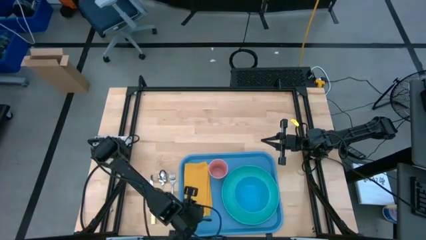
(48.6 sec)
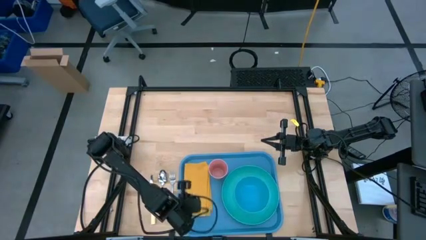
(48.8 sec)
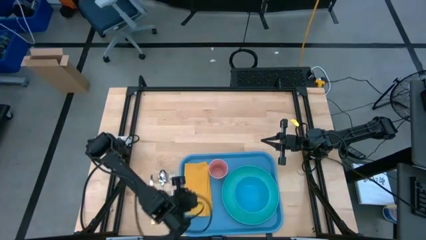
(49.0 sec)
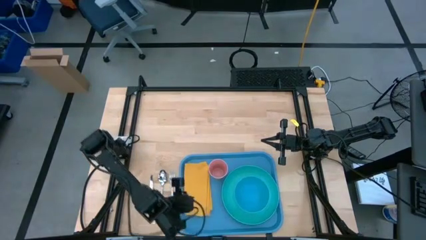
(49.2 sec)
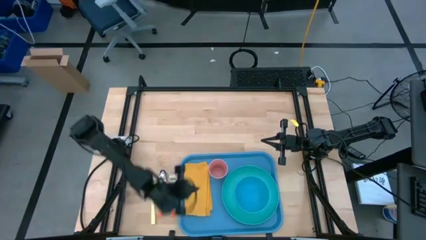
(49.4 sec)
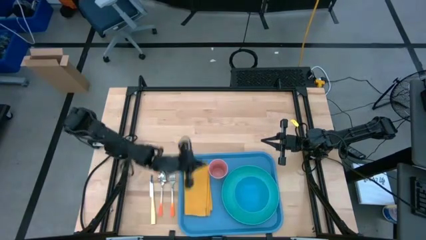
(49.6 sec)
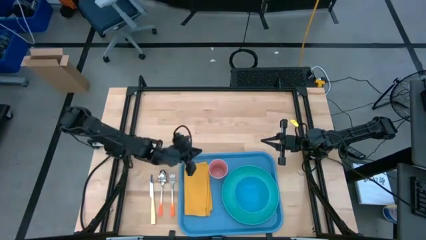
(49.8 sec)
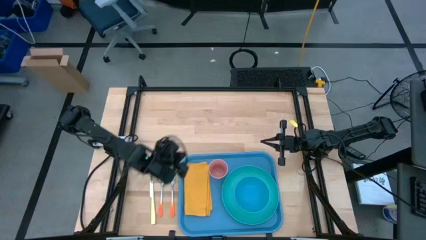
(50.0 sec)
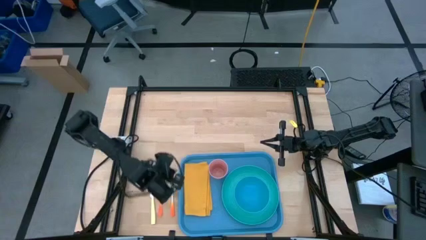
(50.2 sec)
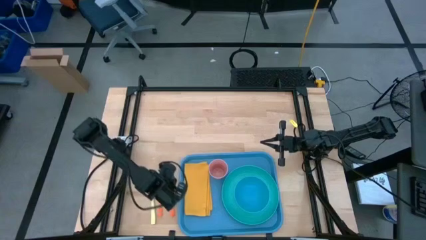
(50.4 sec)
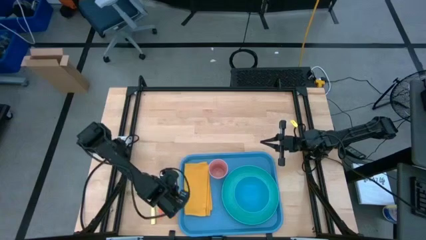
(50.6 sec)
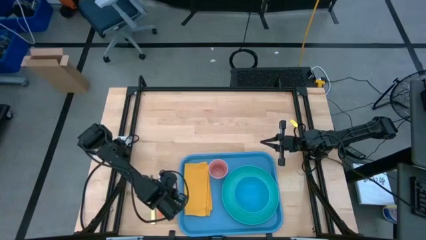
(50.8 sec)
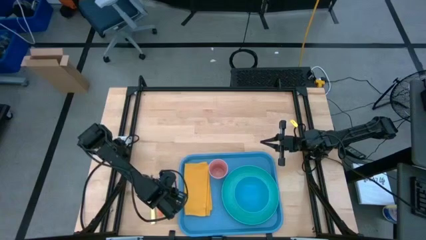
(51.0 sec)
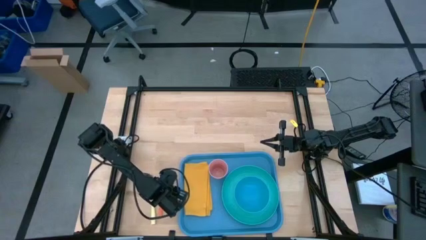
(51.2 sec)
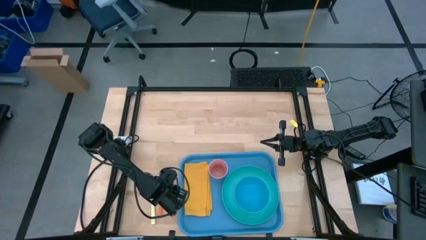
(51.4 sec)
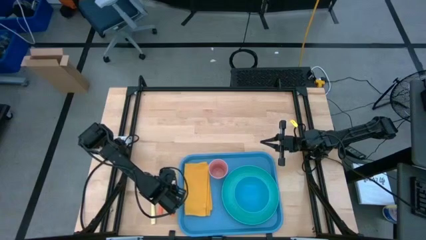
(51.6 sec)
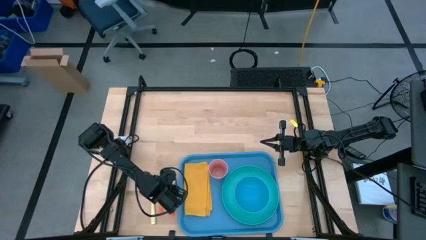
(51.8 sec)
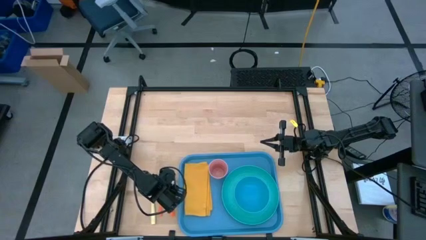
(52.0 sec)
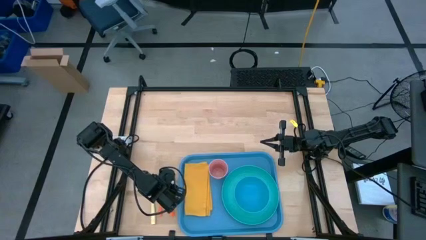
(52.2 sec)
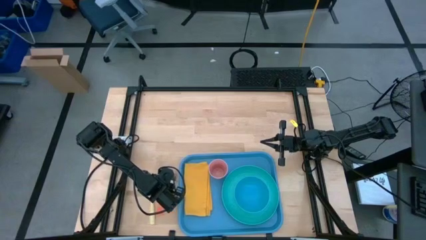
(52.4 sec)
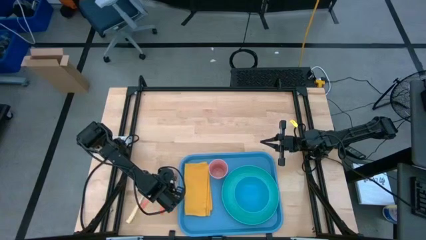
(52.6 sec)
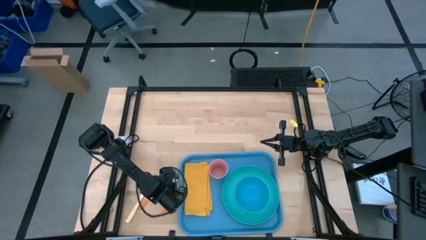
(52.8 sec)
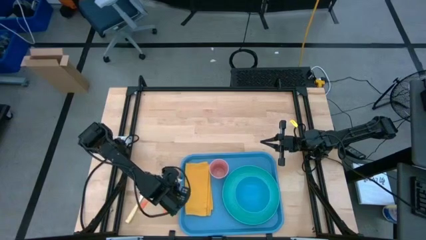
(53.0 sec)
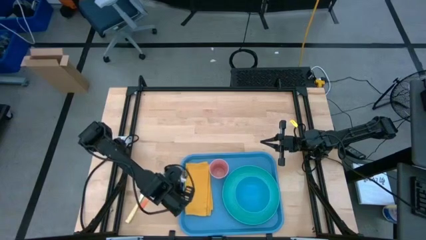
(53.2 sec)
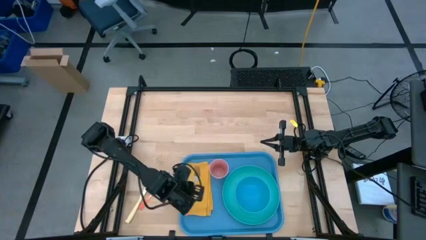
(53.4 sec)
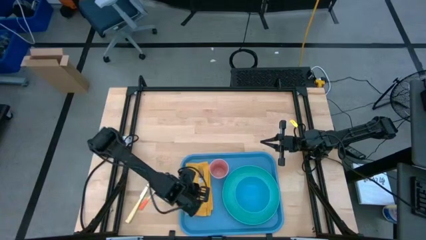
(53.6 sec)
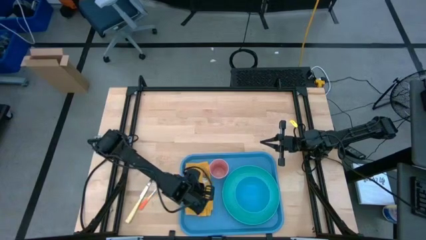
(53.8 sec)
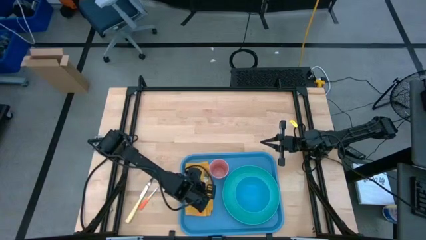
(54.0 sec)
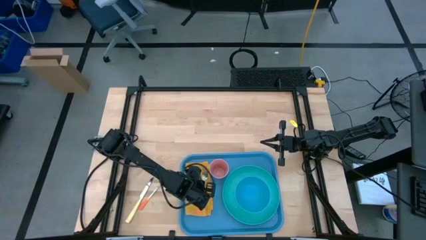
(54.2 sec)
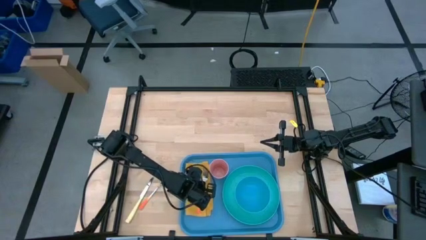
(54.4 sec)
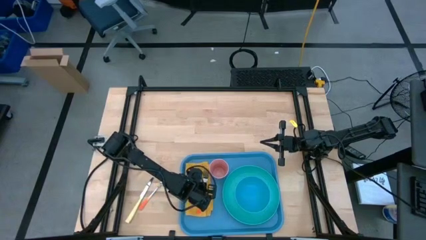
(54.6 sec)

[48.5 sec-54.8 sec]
Task: Set up tray
Put the orange fork on the yellow napkin

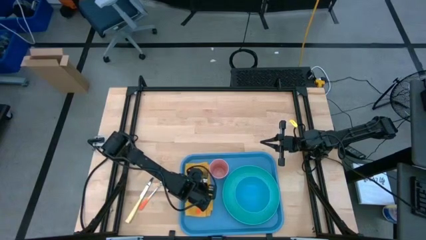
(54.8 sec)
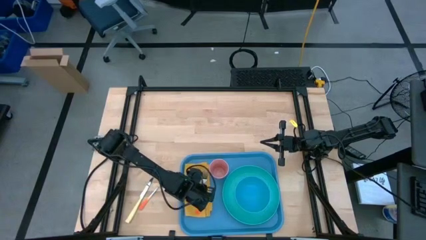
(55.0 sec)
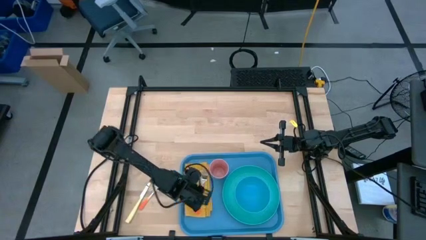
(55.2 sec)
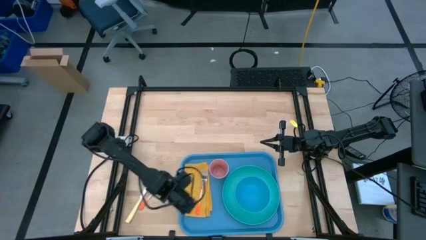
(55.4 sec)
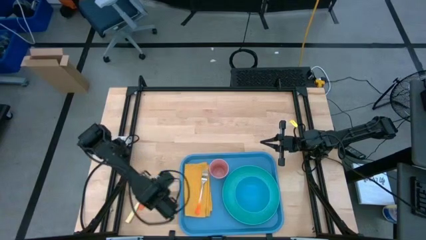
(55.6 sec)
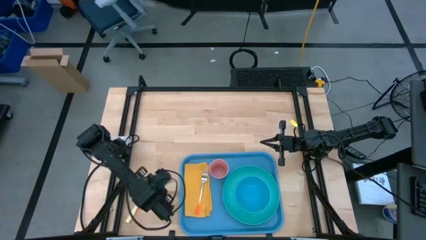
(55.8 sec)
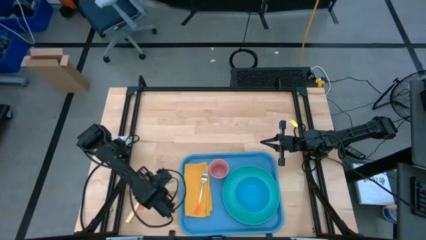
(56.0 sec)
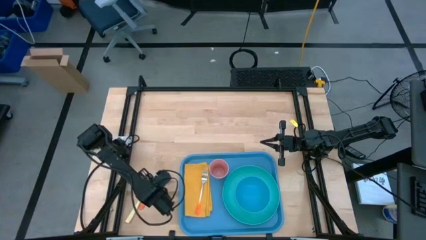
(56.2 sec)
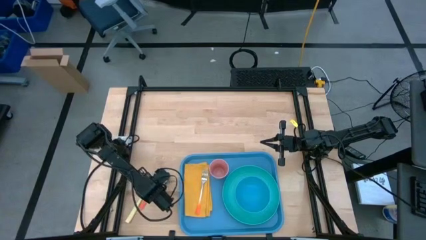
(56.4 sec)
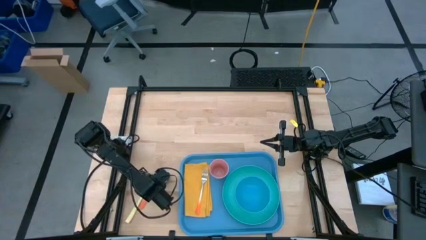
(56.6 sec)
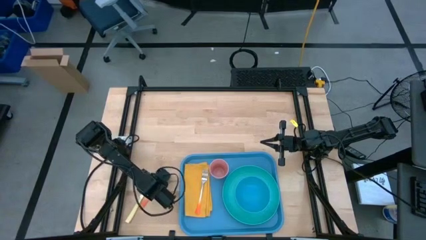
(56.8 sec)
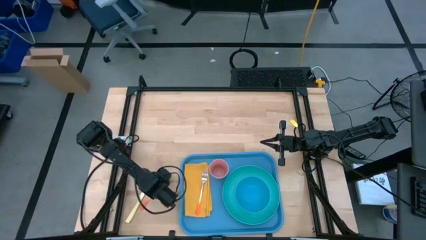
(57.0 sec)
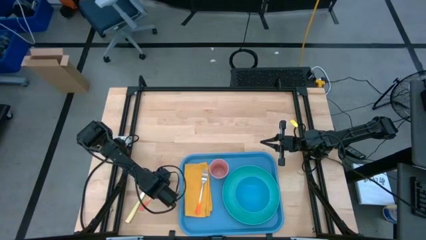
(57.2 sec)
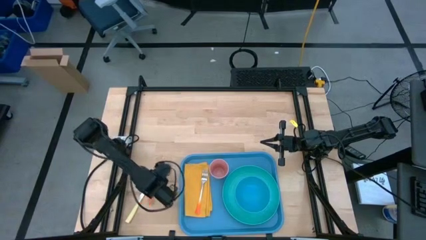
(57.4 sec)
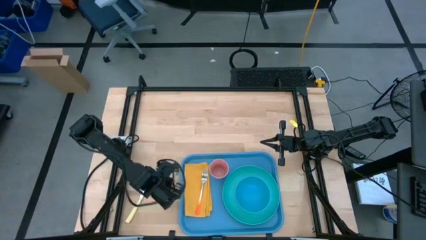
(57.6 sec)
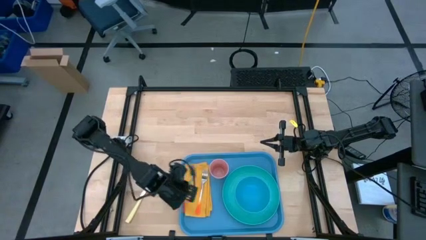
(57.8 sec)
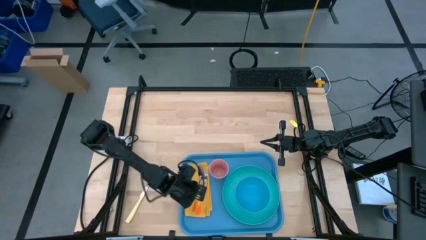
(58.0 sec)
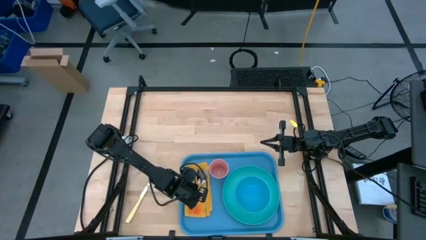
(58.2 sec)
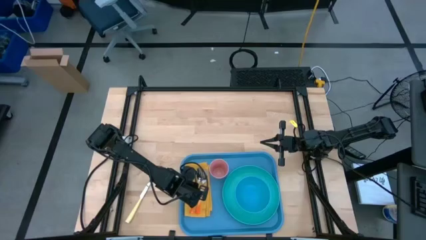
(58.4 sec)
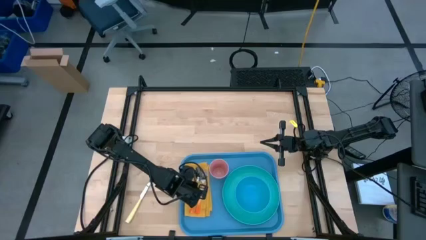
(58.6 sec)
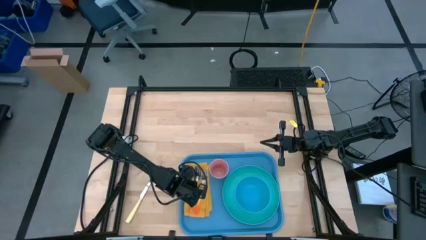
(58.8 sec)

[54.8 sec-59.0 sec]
Put the orange spoon on the yellow napkin to the left of the orange fork

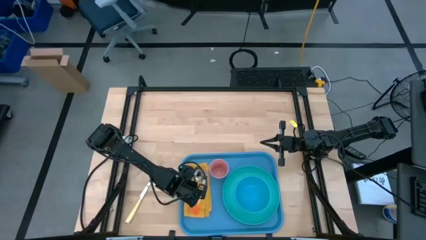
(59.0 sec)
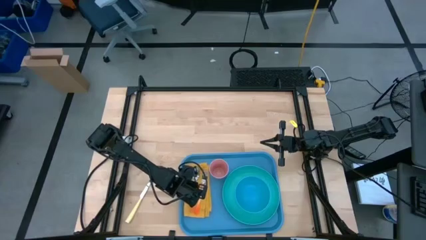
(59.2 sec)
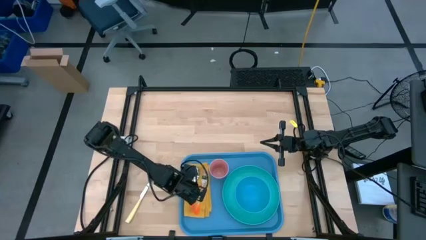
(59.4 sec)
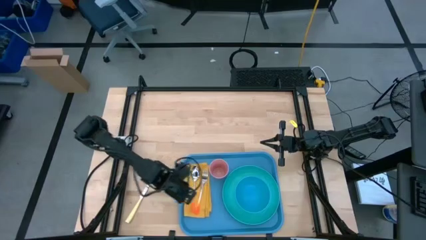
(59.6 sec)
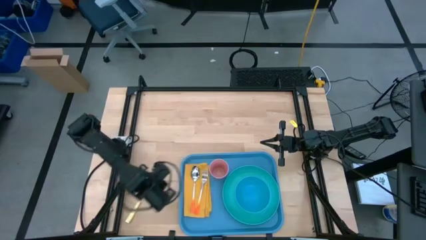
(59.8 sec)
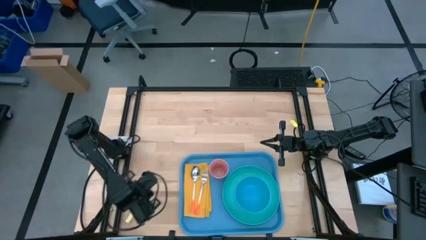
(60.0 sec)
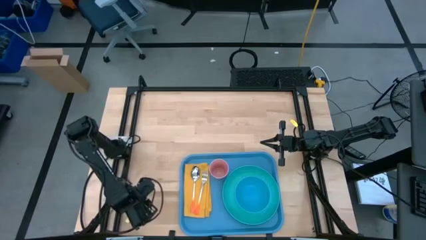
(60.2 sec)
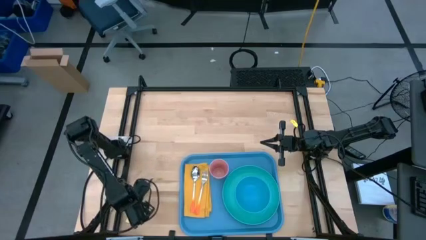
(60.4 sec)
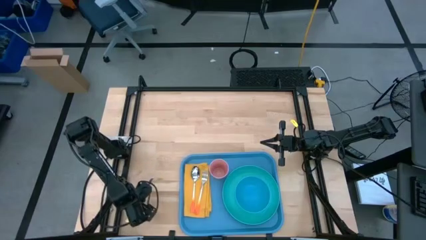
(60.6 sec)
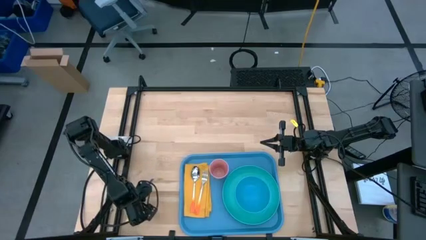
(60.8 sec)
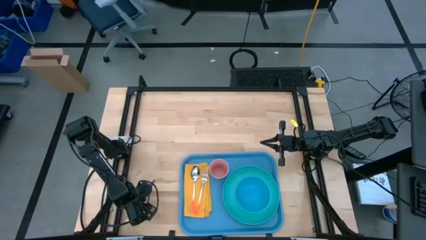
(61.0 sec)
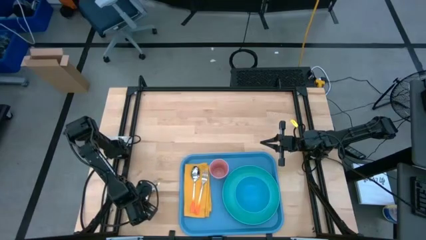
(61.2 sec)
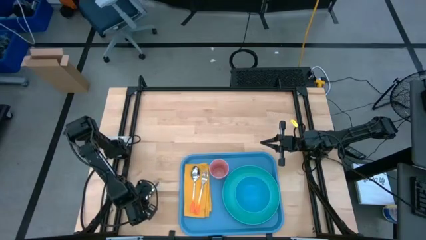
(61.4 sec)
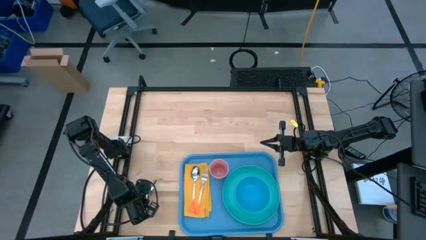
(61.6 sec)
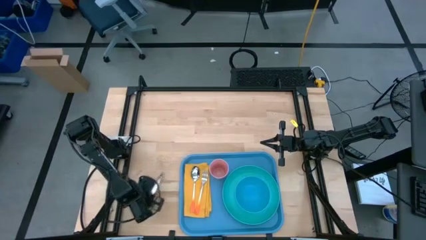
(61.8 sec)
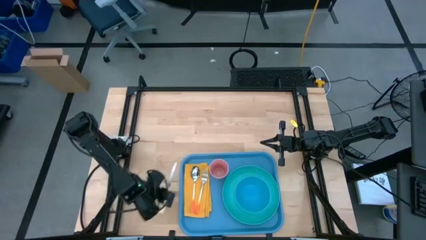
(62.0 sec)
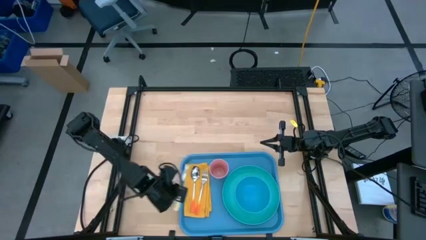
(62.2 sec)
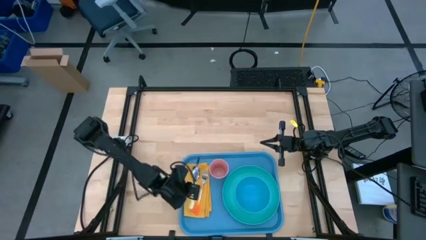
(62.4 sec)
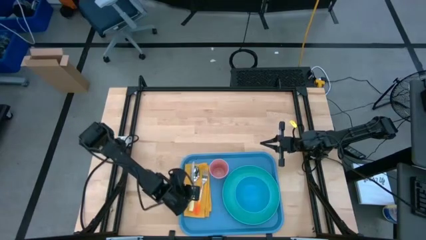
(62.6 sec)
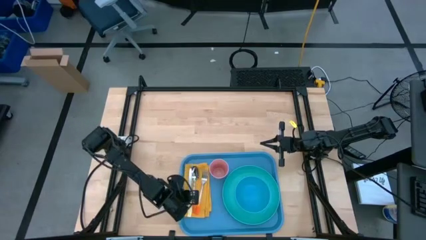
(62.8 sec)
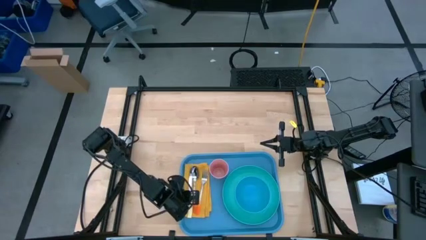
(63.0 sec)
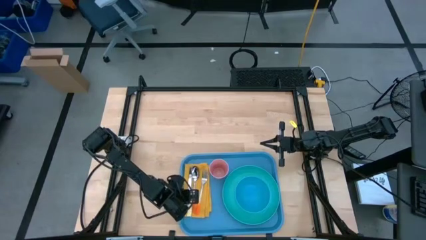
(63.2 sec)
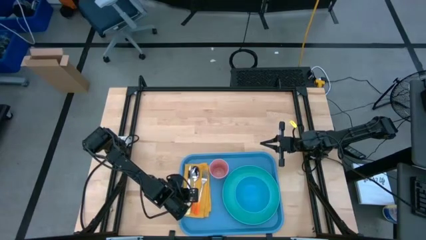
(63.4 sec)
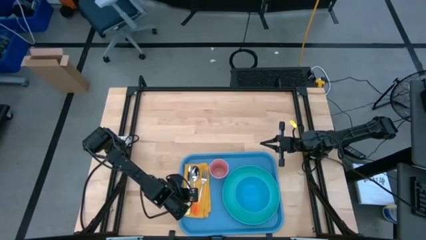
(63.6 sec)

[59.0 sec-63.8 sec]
Put the yellow knife on the yellow napkin to the left of the orange spoon
